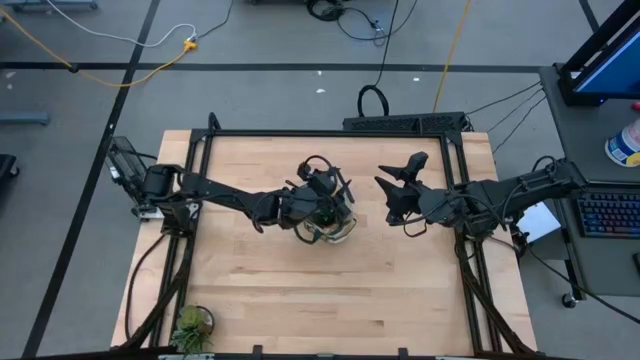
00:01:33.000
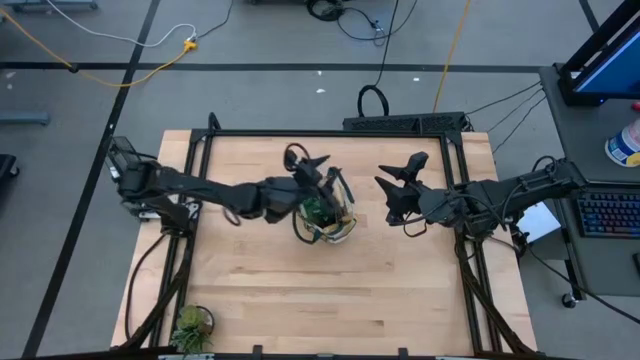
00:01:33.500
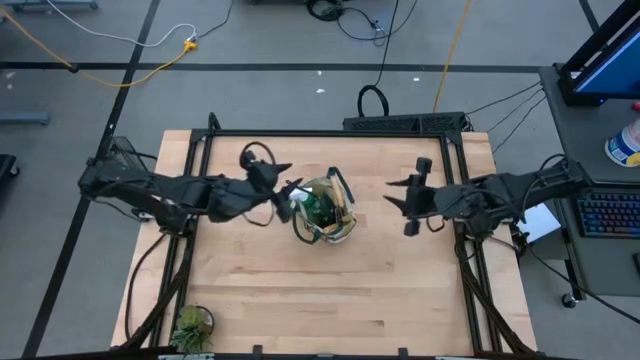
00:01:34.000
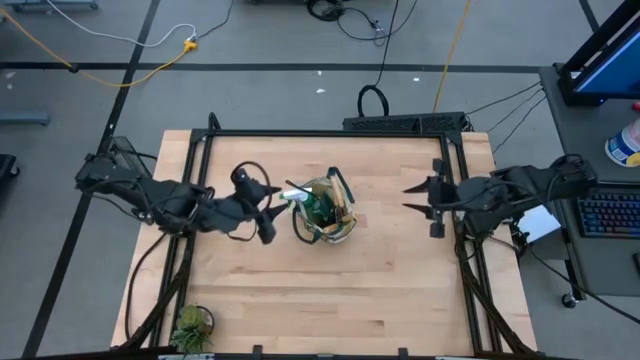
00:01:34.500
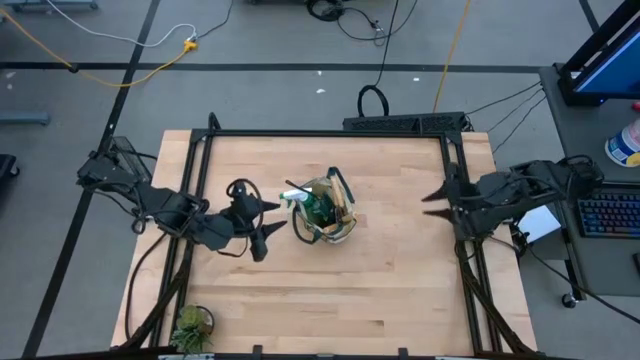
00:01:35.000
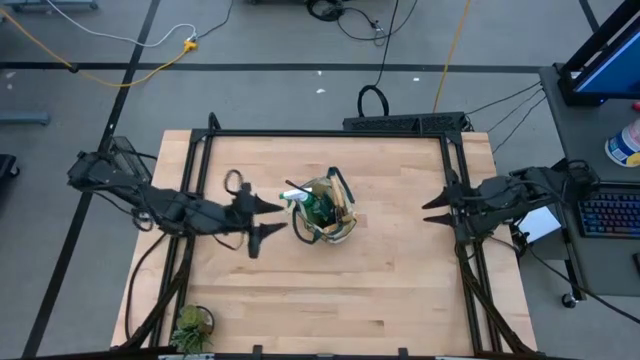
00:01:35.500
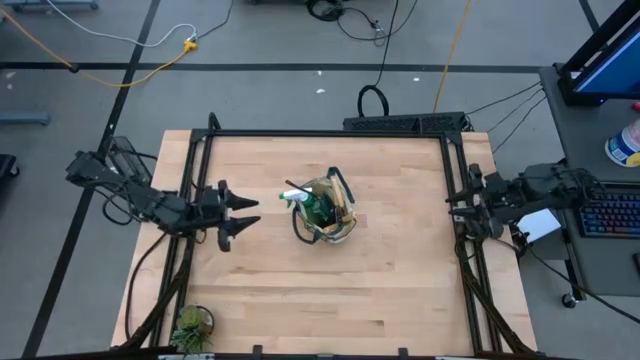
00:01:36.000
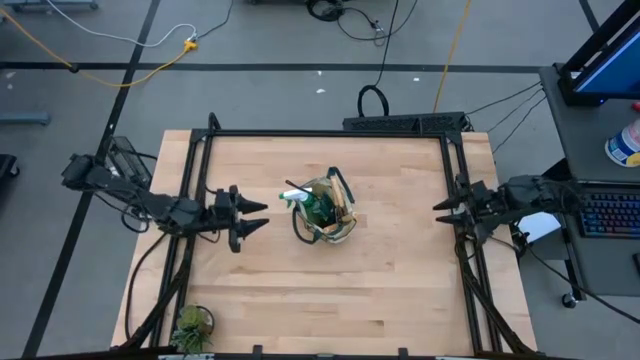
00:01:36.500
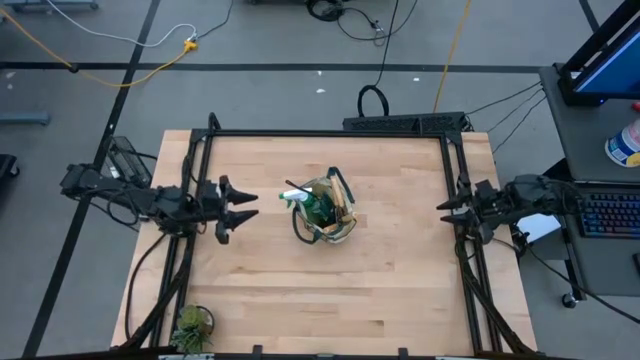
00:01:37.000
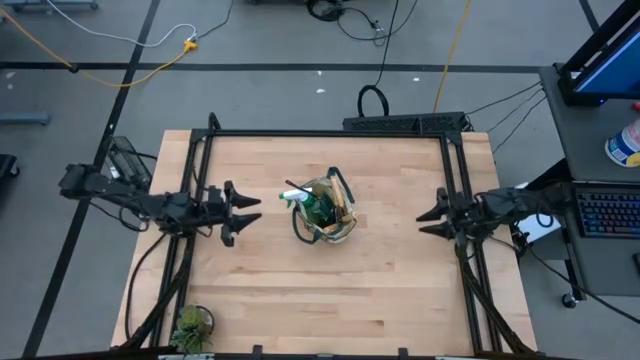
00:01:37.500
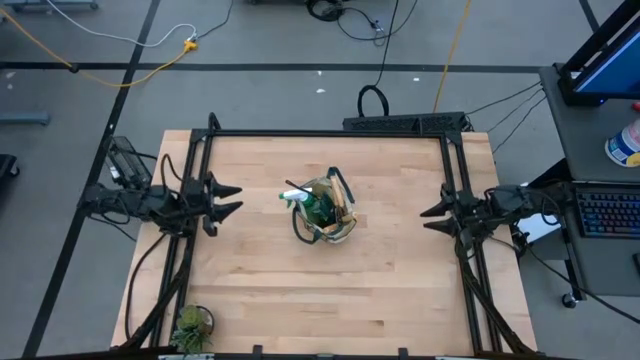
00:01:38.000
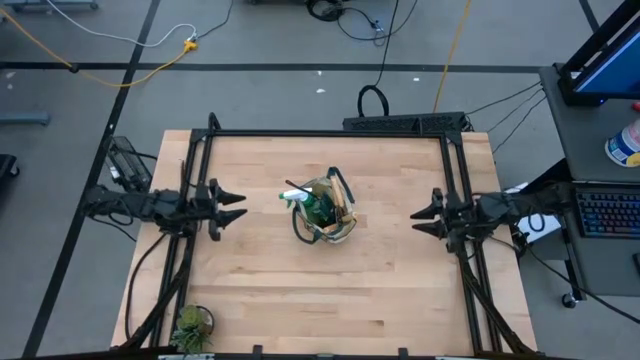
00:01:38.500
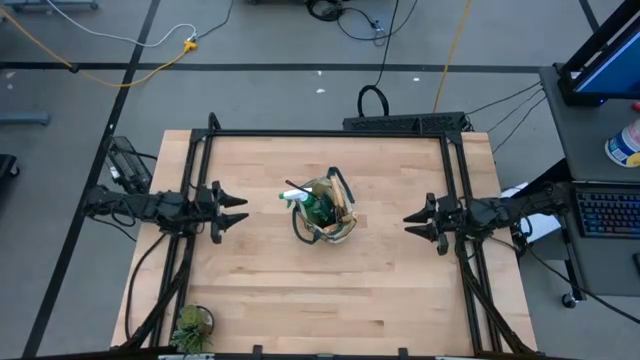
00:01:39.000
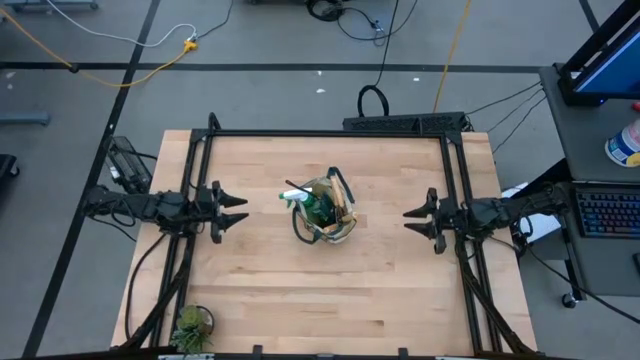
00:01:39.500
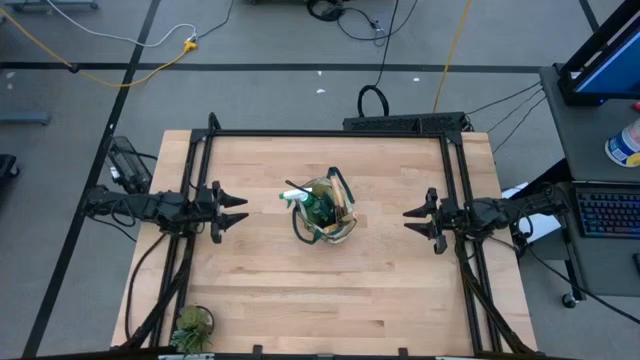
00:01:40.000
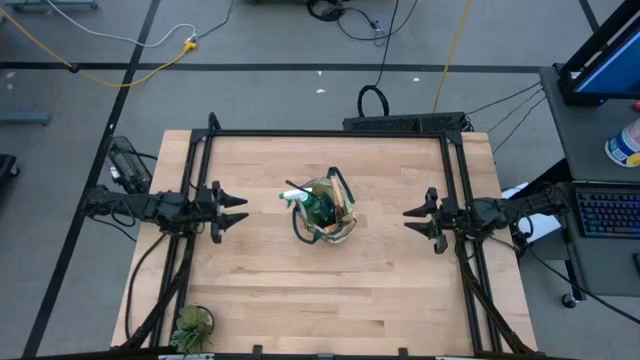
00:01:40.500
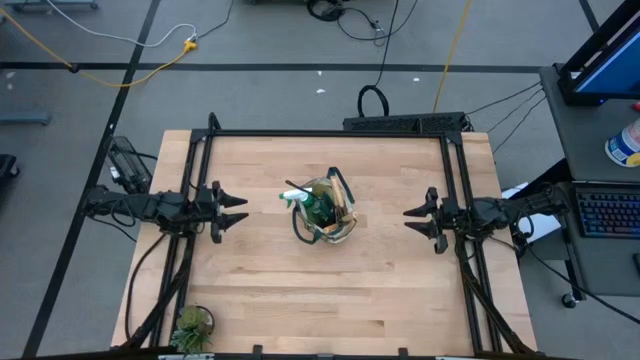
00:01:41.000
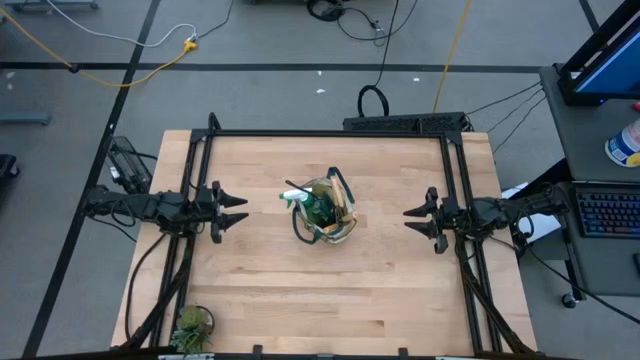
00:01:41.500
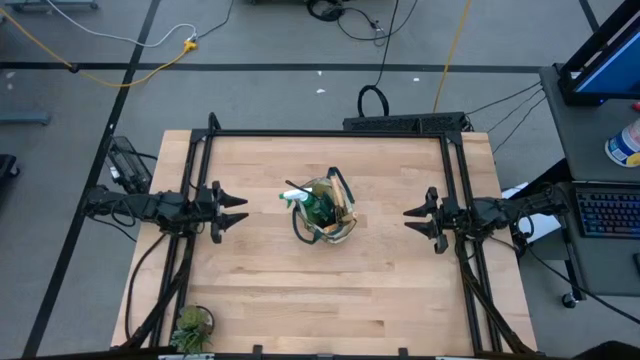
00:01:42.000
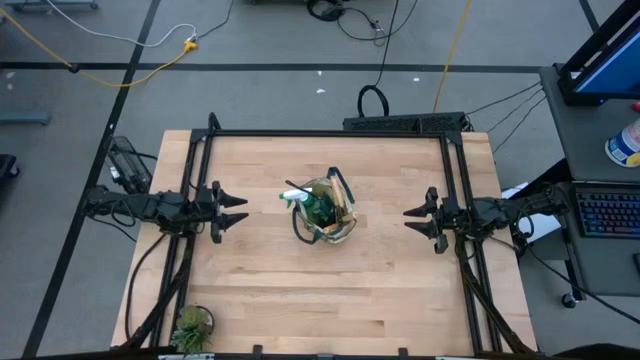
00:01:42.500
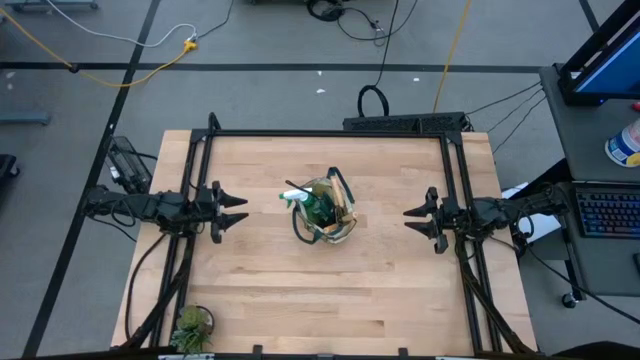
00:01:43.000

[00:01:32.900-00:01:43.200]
Task: Pick & Place Garden tools in Gardening bag
Return to Home Position

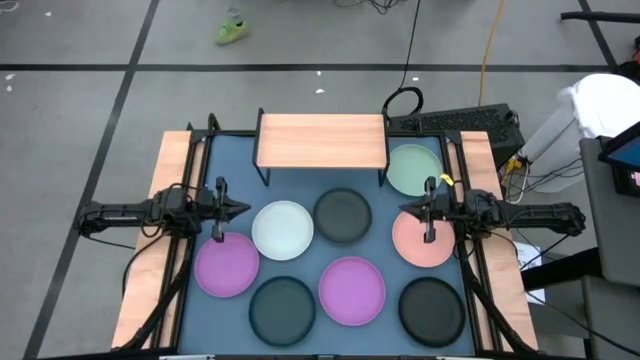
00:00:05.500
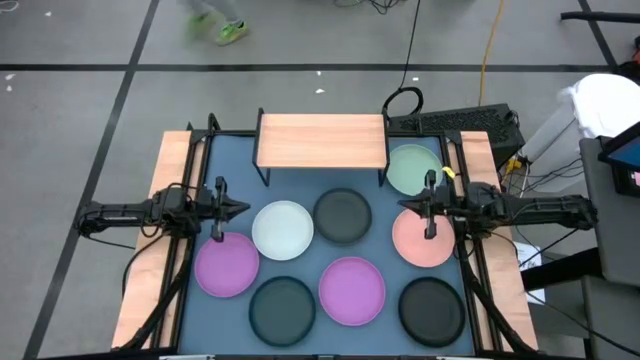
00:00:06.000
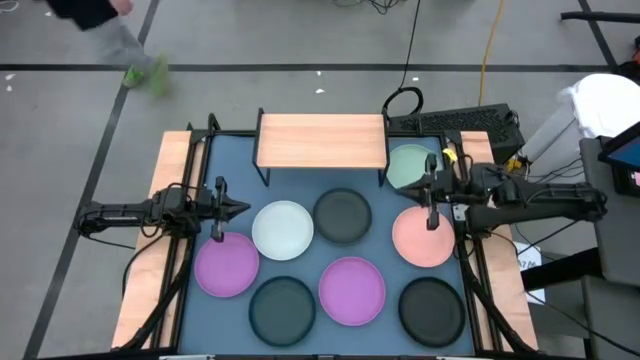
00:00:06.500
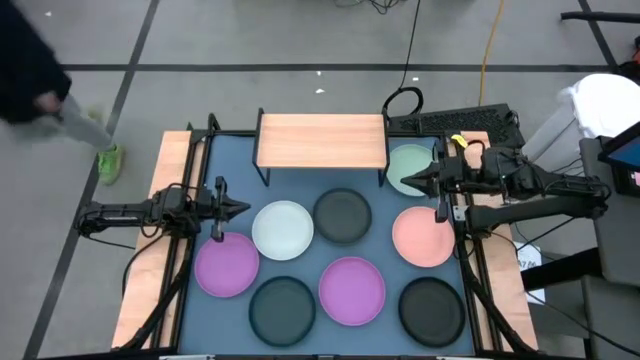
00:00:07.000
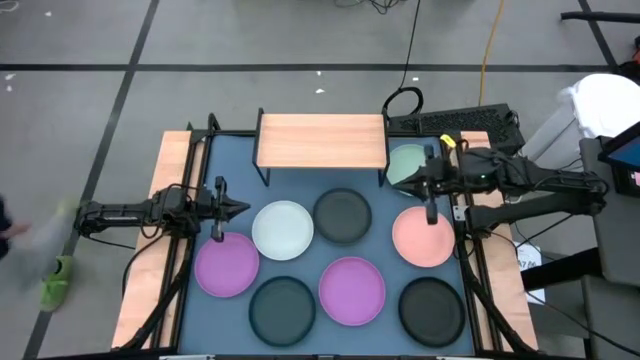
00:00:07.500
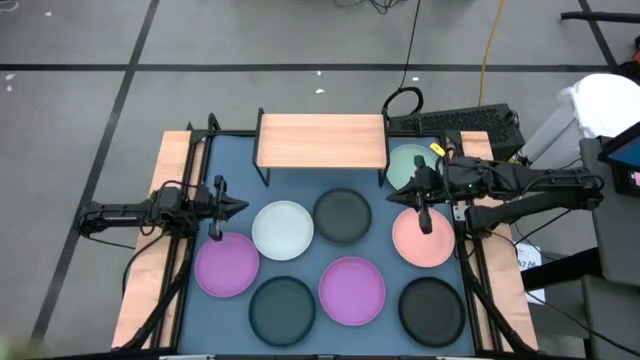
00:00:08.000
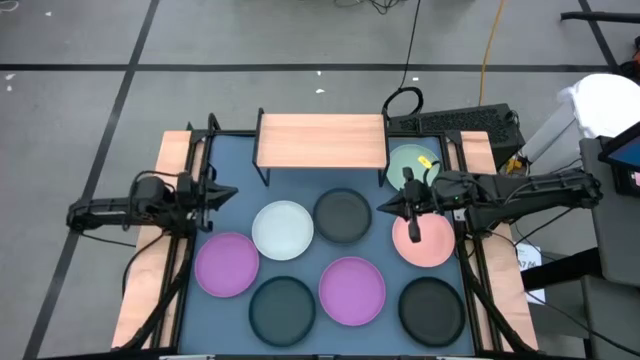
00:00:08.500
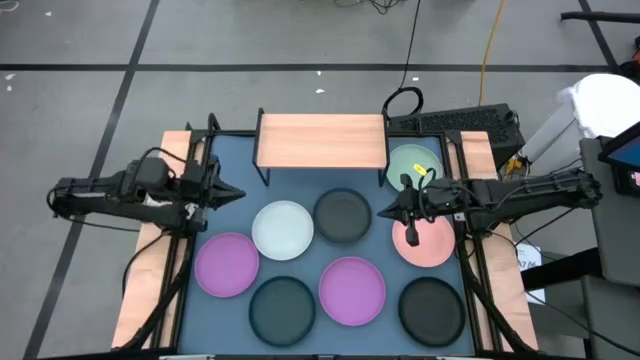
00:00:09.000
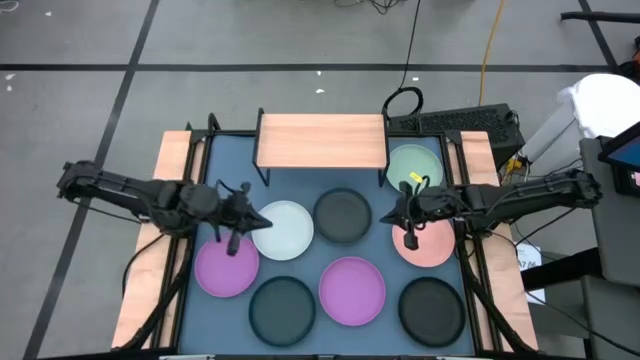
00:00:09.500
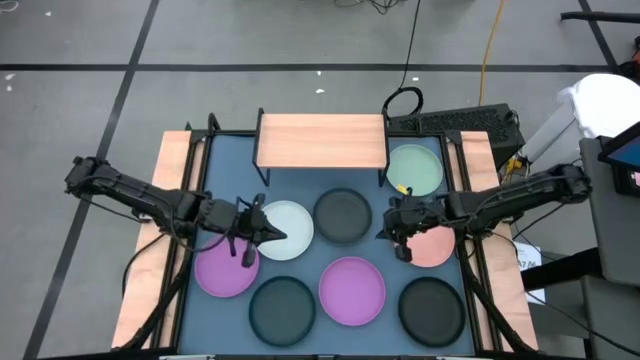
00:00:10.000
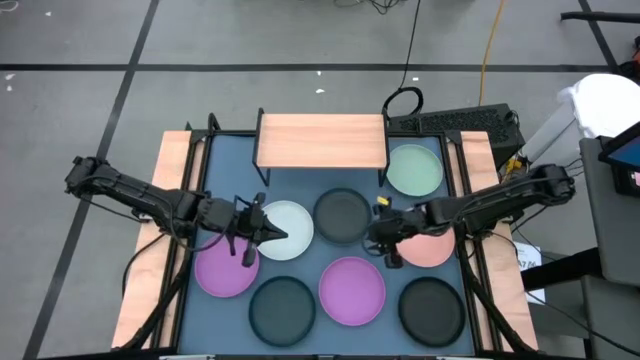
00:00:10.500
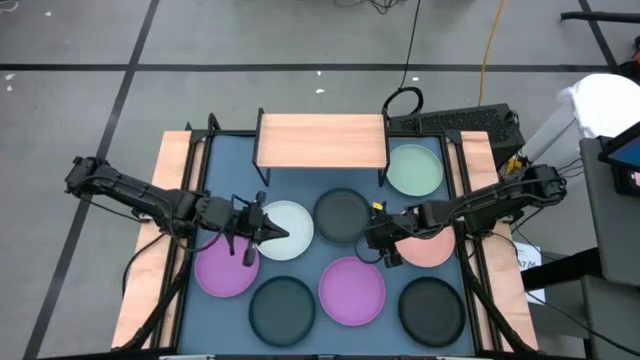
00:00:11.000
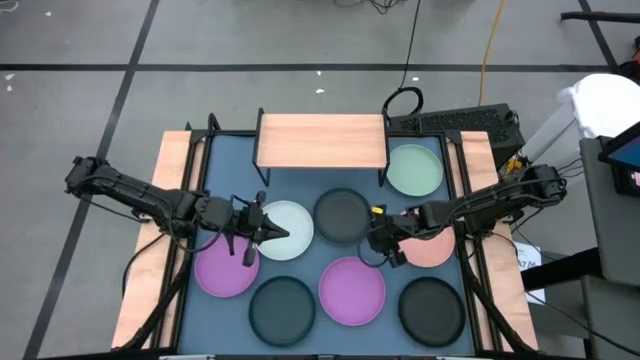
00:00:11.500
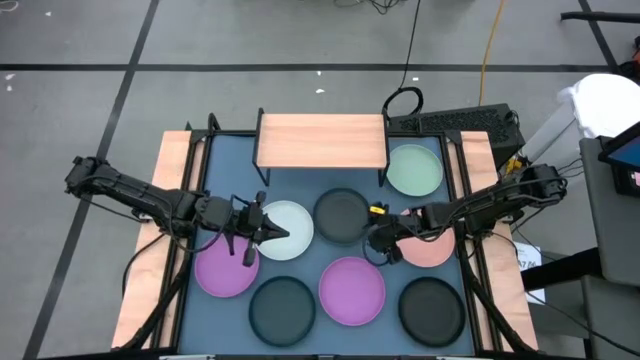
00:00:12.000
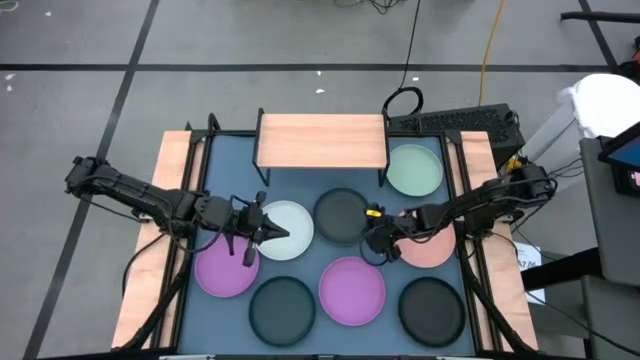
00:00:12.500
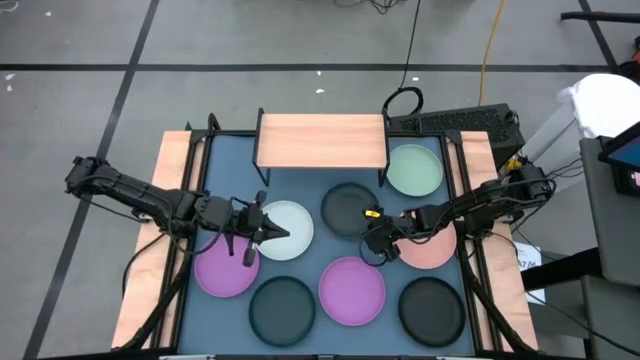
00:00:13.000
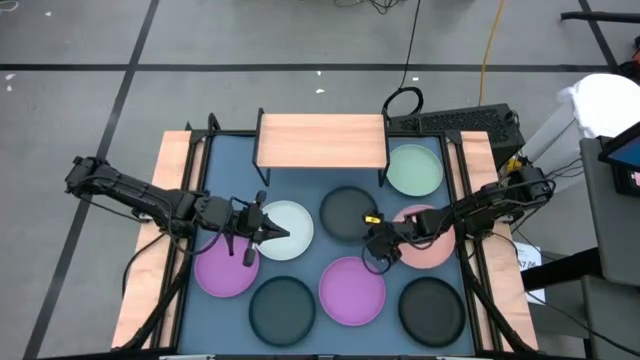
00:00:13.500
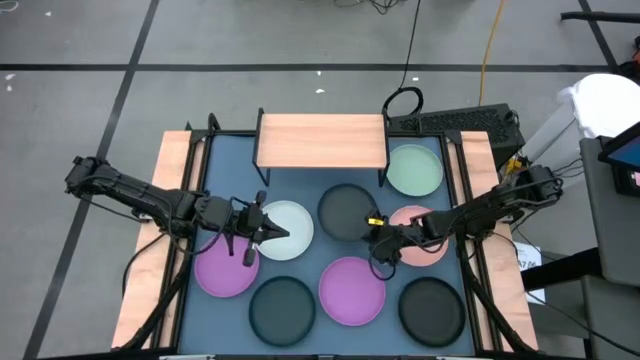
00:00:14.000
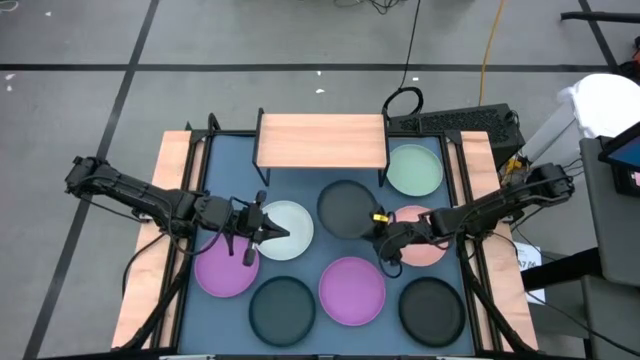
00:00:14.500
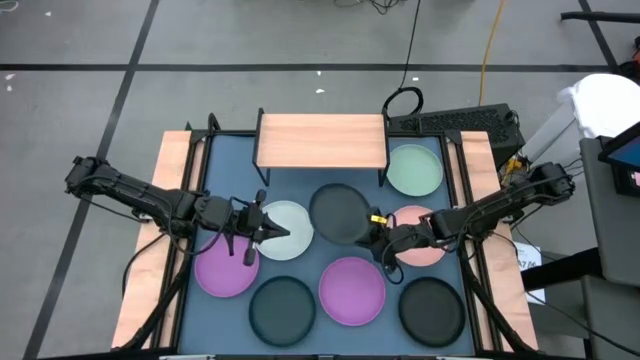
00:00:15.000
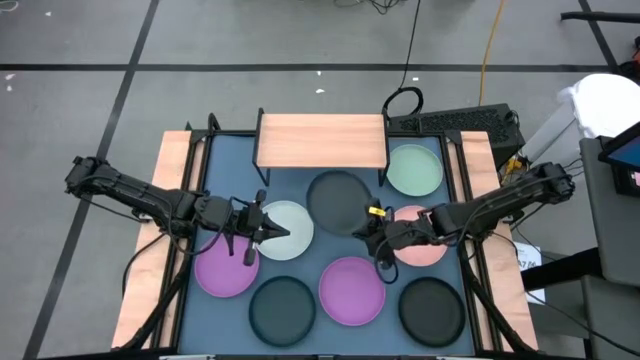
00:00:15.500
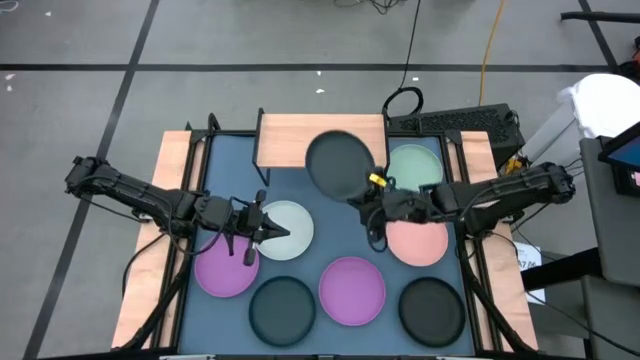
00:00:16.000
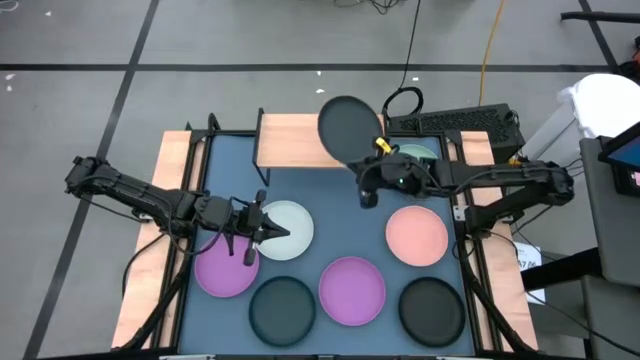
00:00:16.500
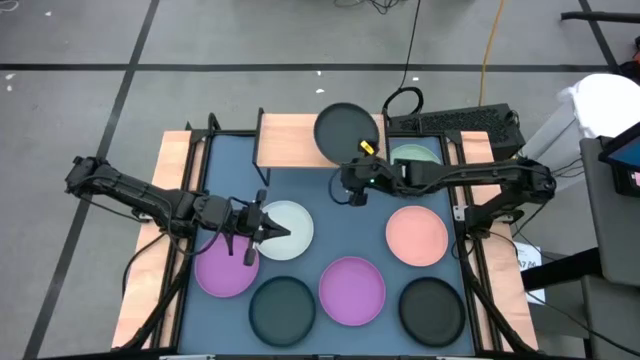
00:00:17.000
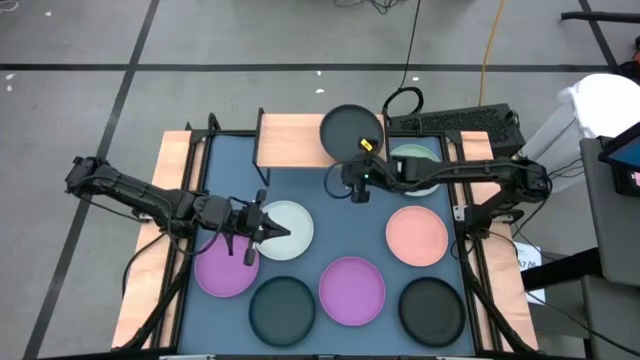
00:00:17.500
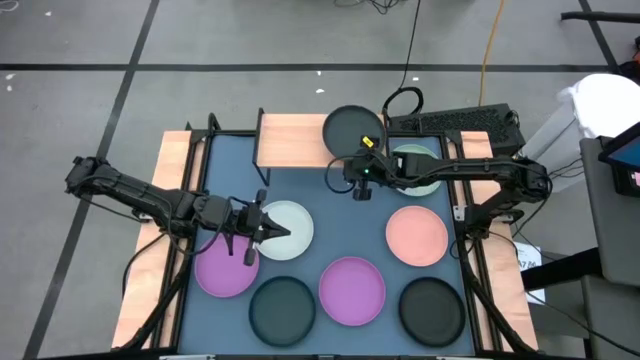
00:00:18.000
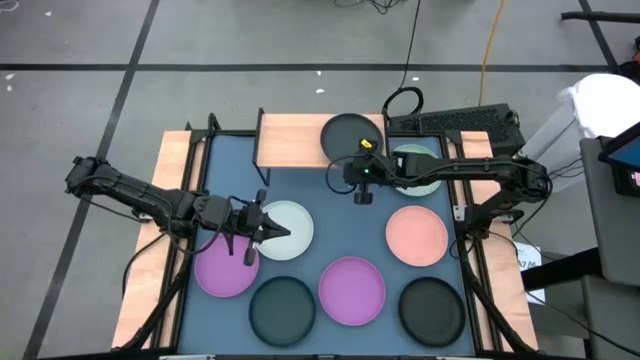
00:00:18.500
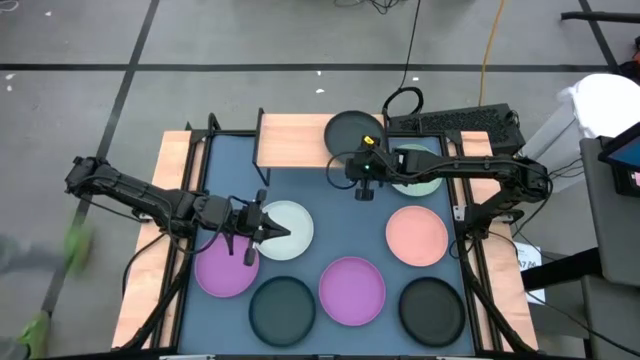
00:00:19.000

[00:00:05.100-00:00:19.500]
Task: Place and stack plates onto a shelf
Put the top black plate on the shelf
